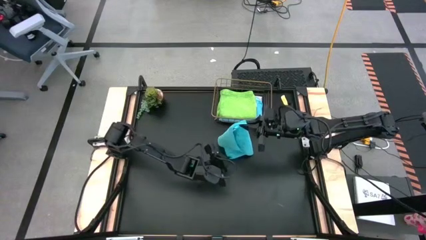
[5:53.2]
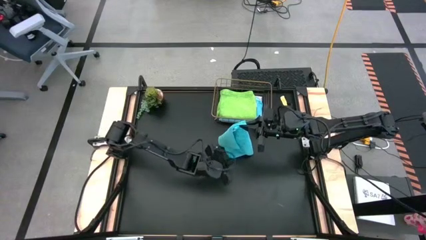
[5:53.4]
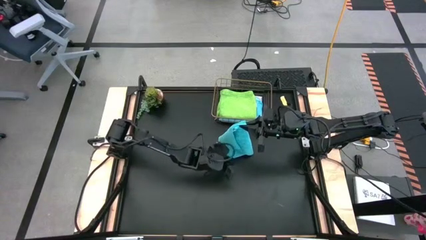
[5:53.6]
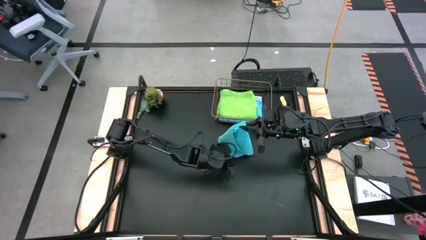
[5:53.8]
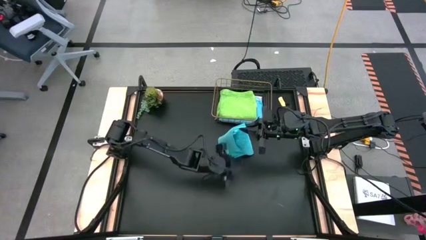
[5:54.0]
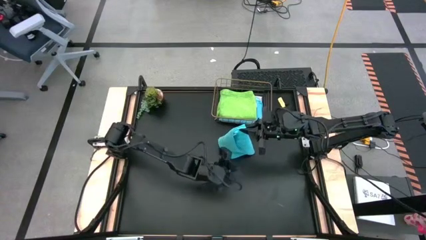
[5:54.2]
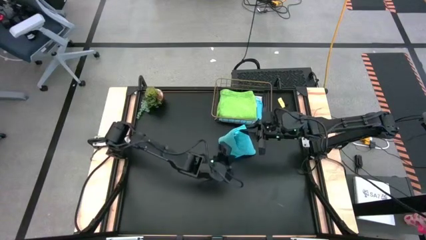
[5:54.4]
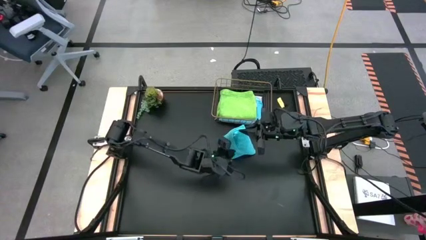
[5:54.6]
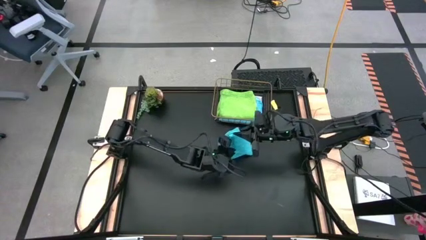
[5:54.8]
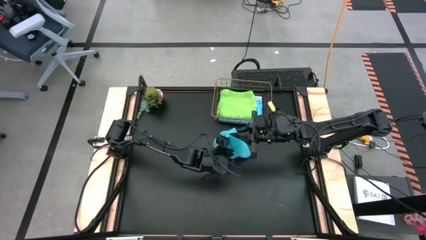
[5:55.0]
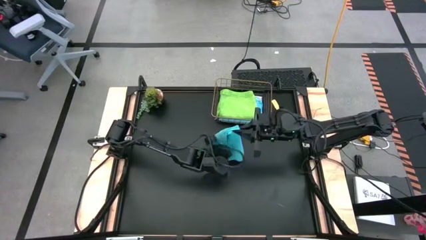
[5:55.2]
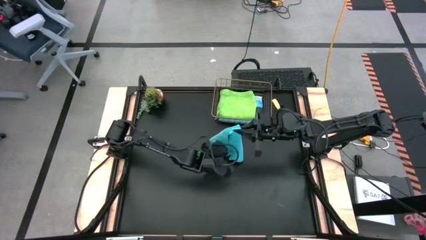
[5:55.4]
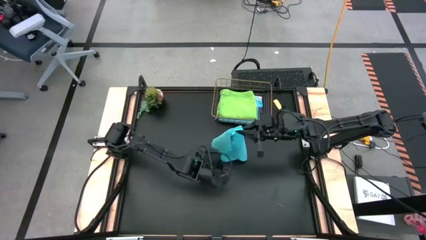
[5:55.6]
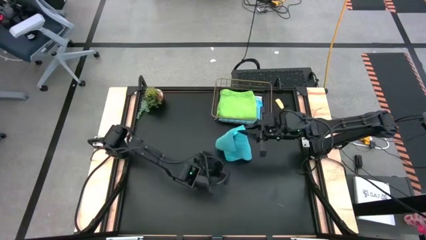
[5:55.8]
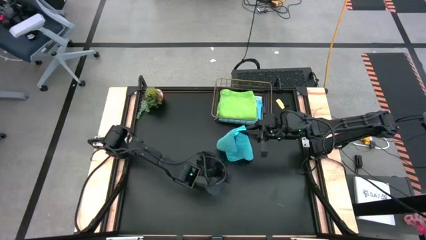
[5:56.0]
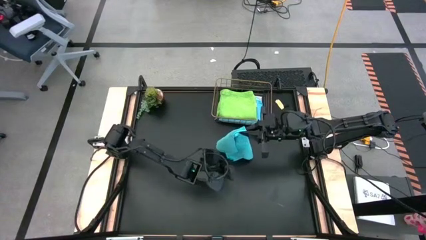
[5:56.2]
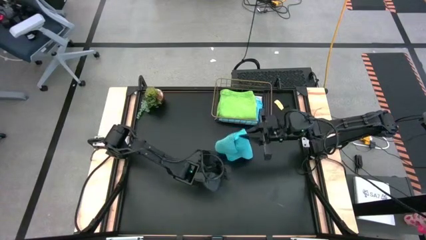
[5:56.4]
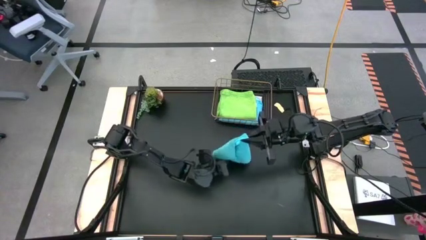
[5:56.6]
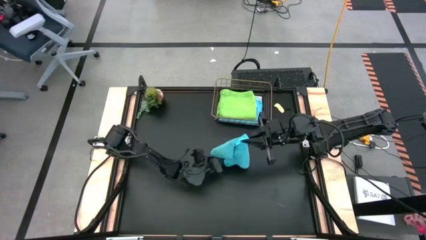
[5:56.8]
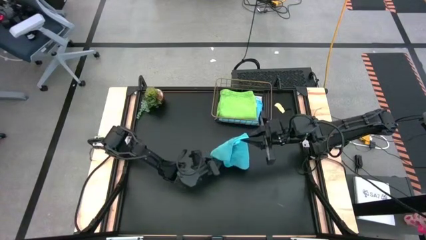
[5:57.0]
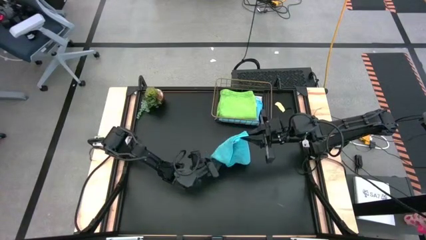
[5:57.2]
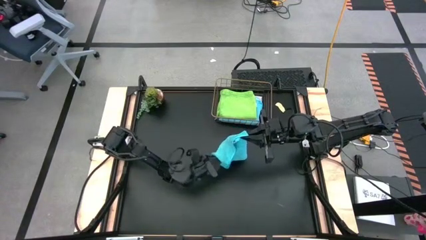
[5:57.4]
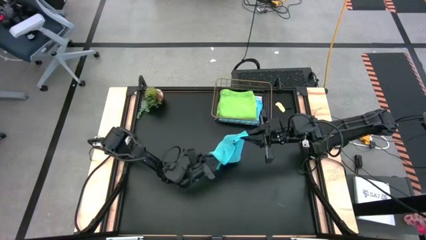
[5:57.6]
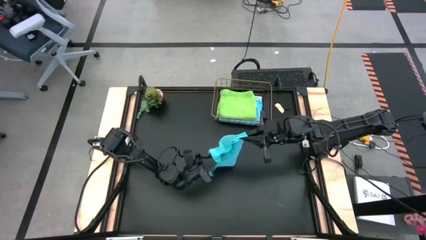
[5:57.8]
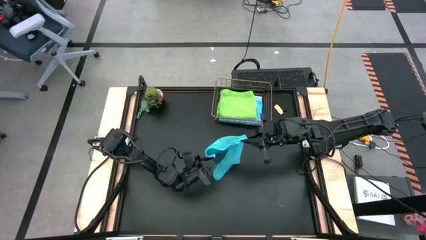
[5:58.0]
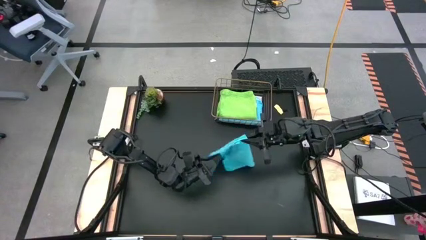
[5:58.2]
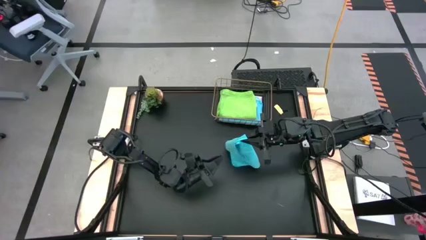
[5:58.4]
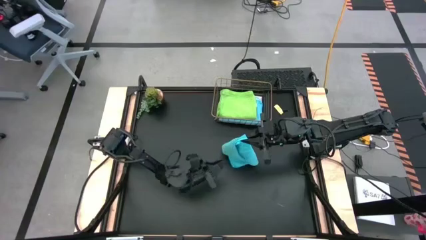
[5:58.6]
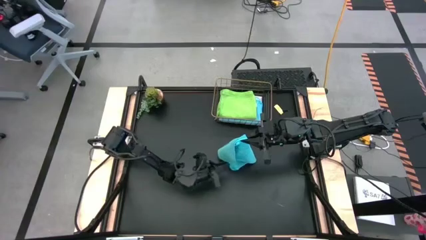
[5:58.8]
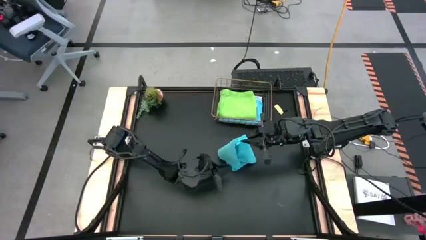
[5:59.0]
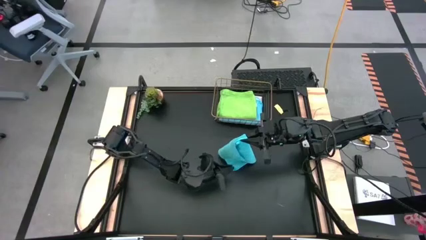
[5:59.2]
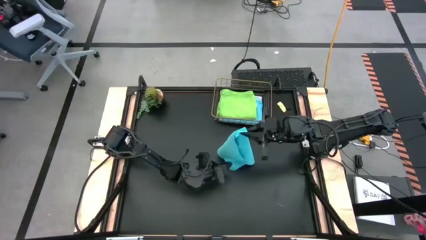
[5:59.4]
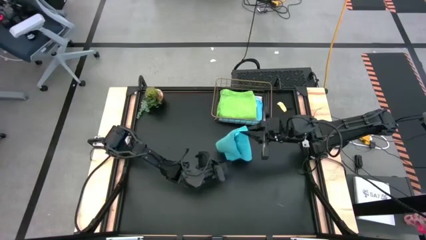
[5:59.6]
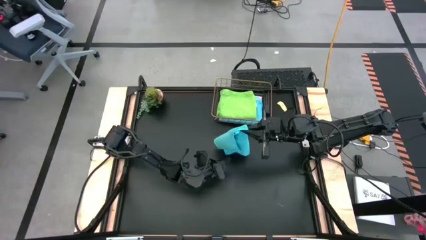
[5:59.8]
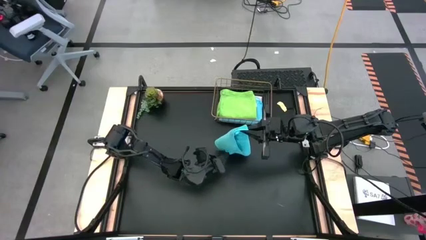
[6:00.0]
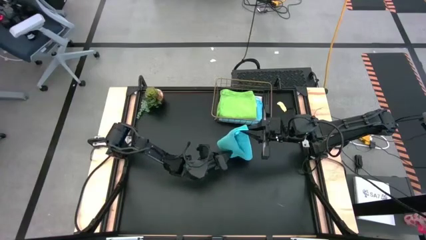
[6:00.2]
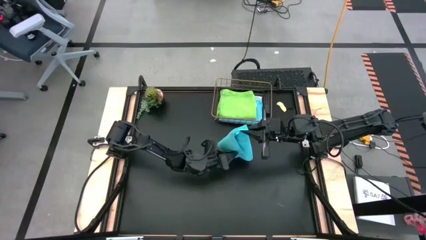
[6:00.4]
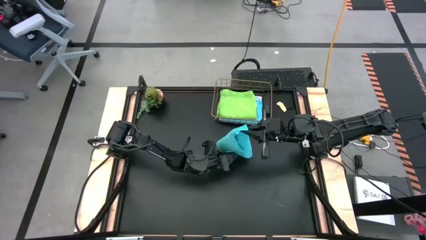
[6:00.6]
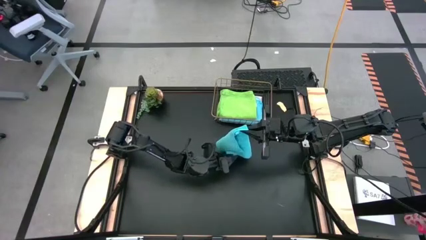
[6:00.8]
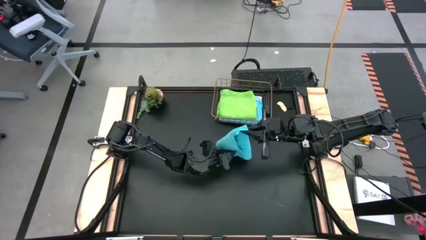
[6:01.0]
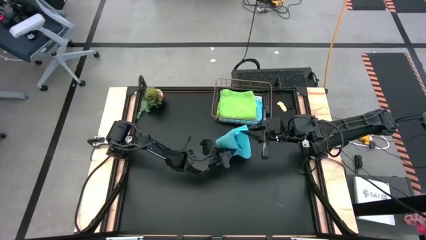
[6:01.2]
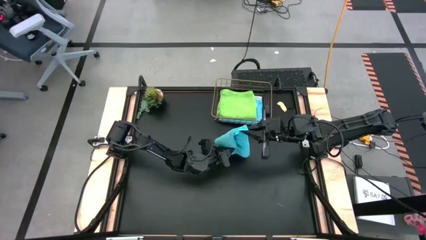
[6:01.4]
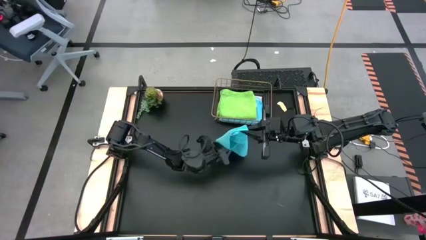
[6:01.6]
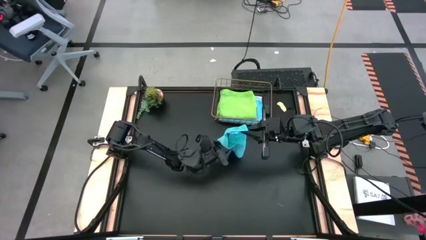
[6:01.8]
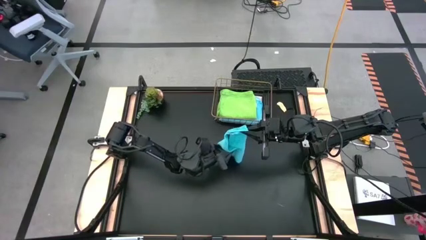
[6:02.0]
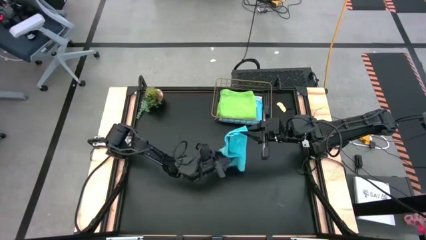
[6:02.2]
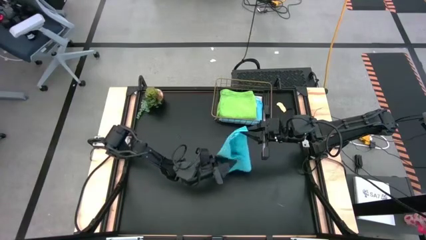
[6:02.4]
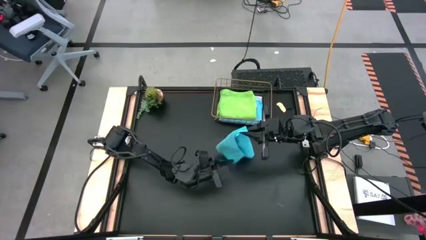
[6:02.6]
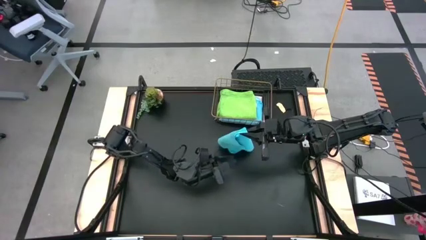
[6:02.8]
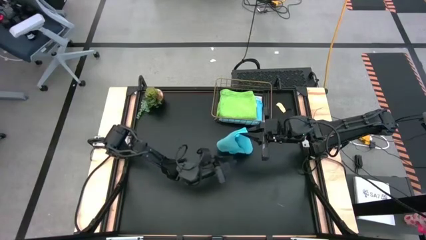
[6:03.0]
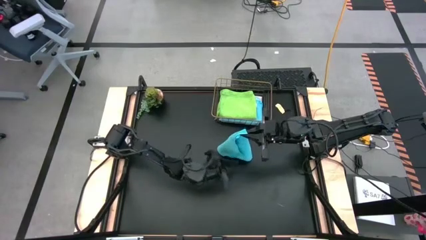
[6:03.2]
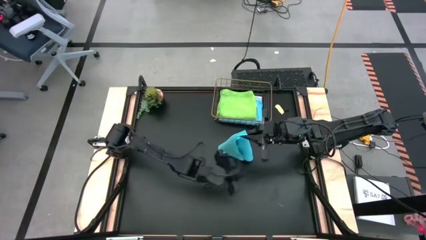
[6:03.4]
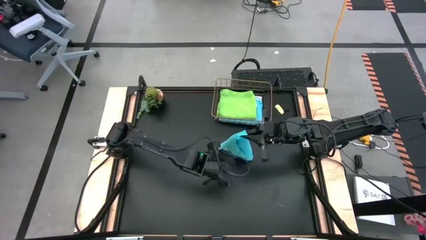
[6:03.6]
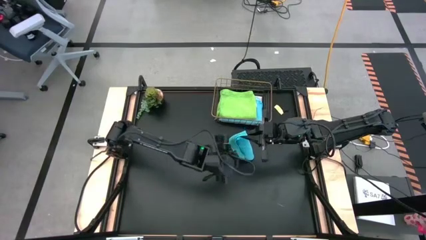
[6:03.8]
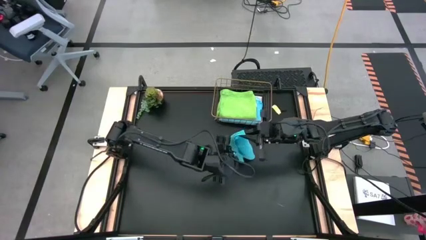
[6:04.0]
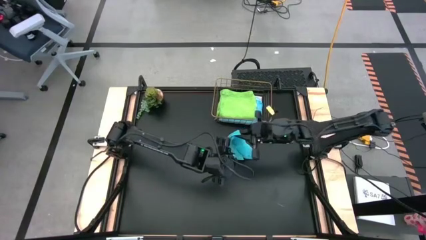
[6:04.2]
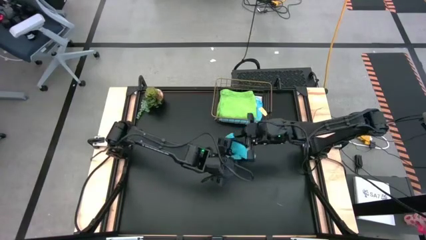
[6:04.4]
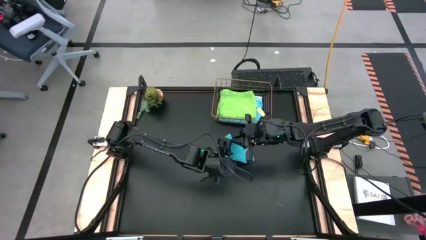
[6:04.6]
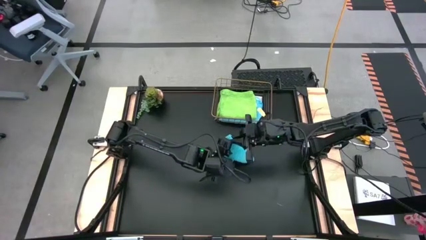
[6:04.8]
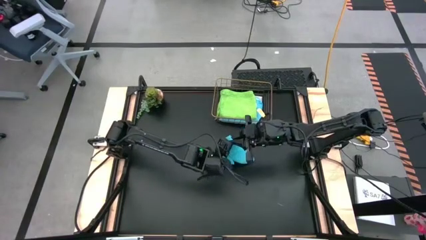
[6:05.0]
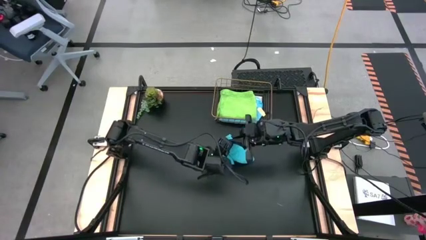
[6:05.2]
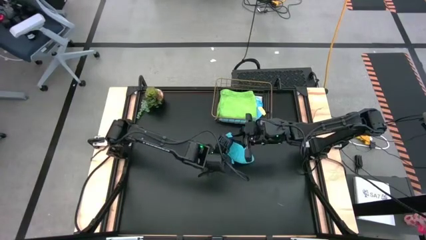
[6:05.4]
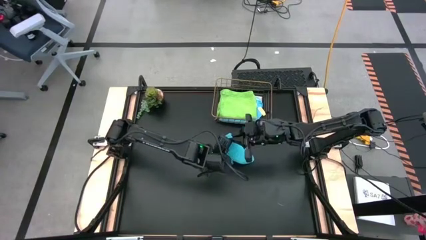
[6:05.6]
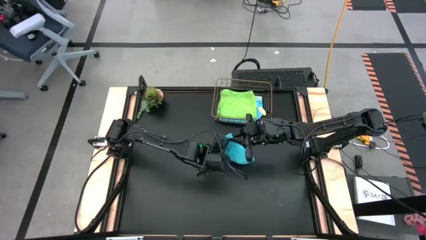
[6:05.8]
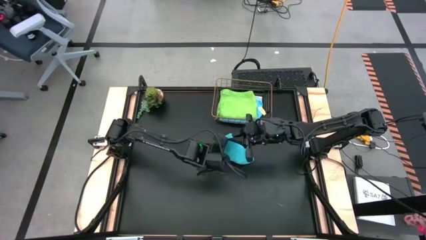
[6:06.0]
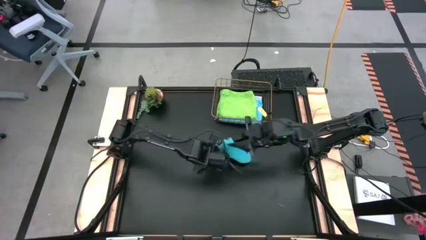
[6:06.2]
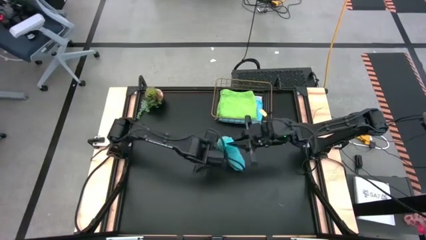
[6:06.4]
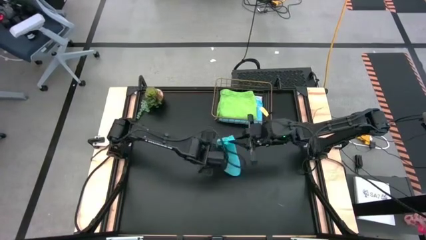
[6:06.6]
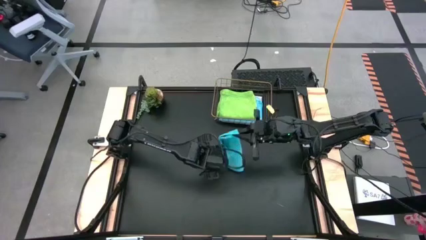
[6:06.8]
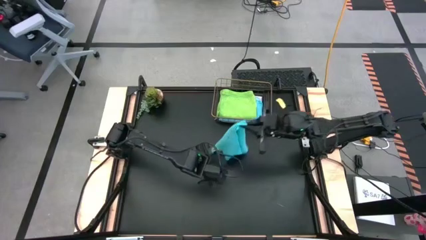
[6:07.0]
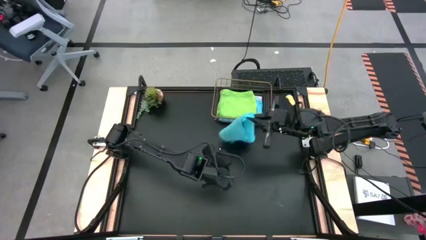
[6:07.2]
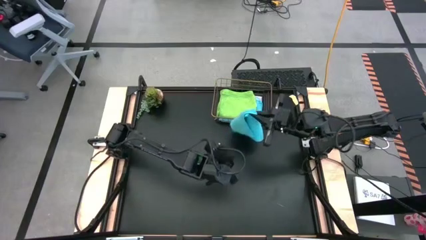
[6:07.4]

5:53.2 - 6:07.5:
Task: Fold microfiber towels
Fold the blue towel
